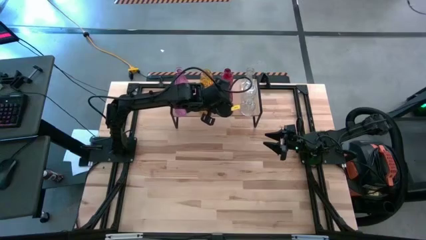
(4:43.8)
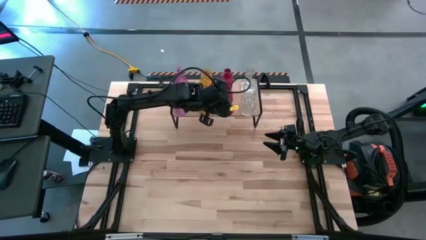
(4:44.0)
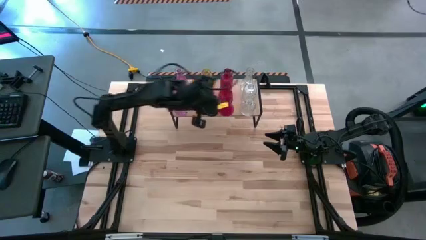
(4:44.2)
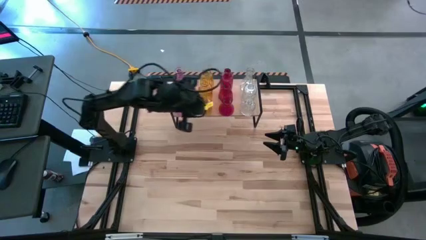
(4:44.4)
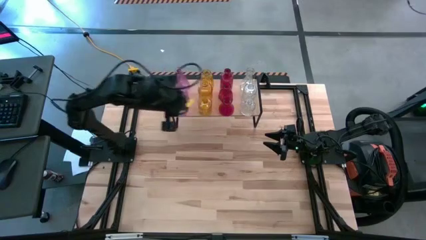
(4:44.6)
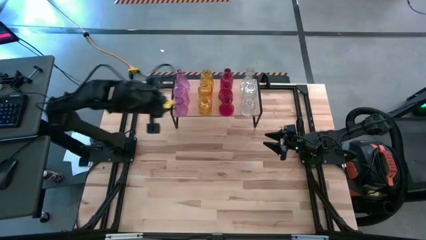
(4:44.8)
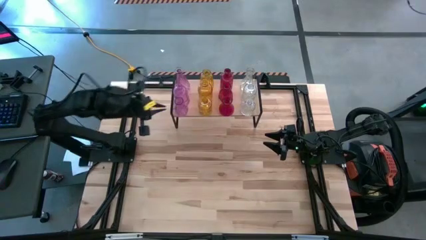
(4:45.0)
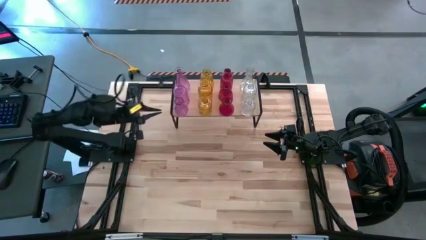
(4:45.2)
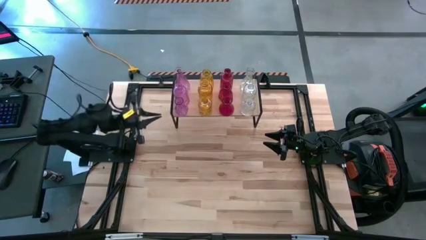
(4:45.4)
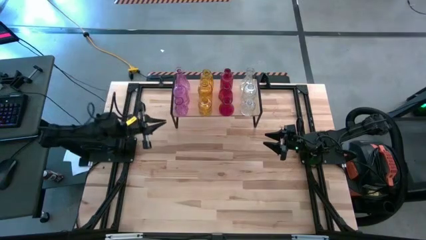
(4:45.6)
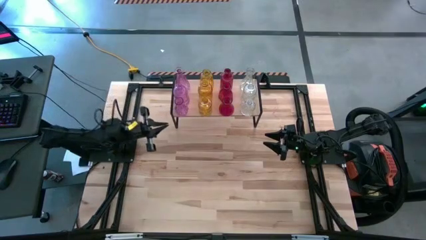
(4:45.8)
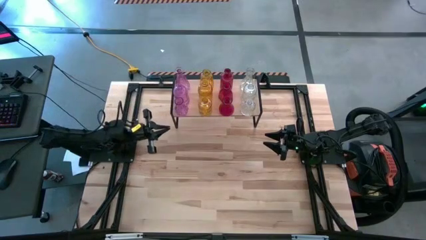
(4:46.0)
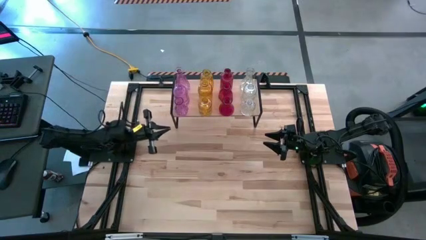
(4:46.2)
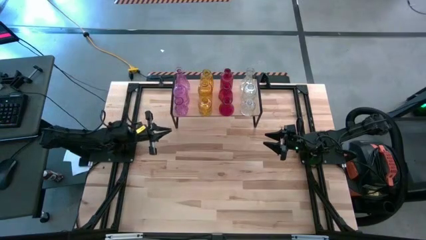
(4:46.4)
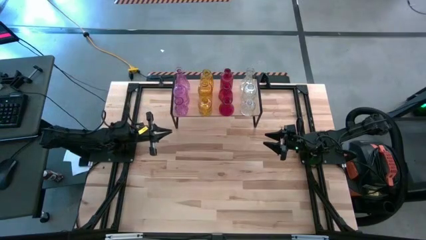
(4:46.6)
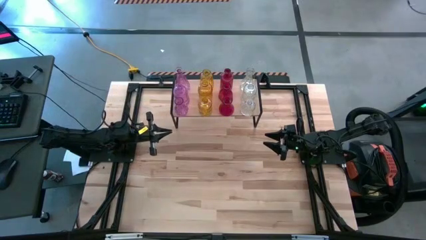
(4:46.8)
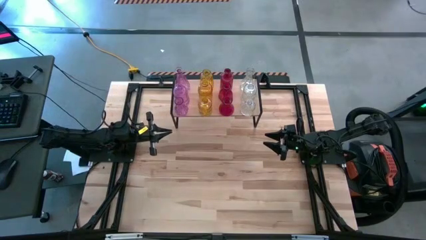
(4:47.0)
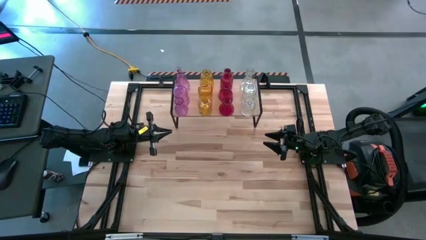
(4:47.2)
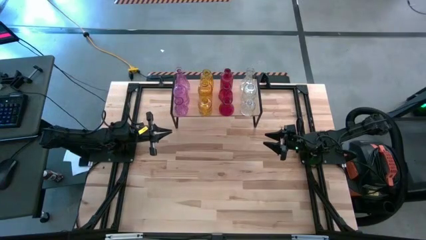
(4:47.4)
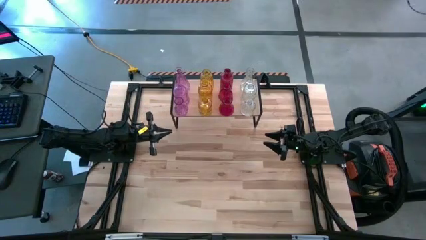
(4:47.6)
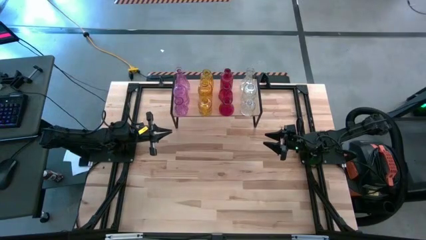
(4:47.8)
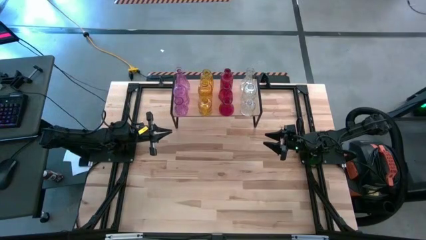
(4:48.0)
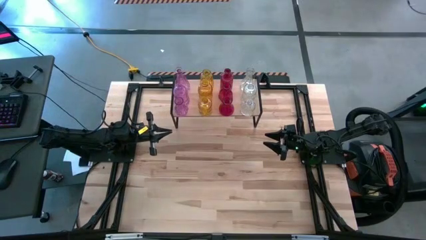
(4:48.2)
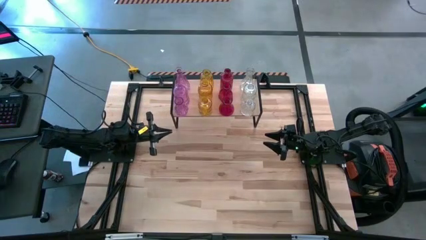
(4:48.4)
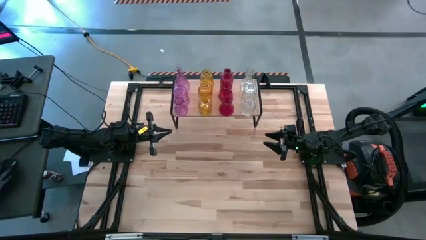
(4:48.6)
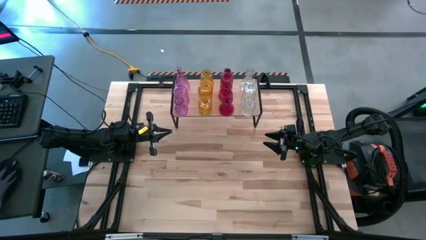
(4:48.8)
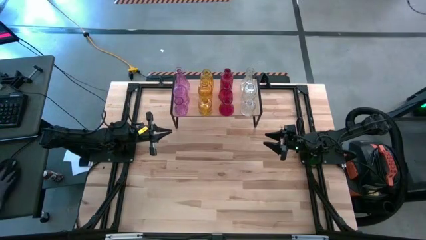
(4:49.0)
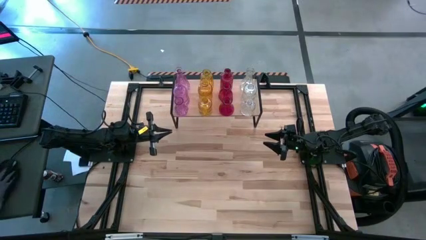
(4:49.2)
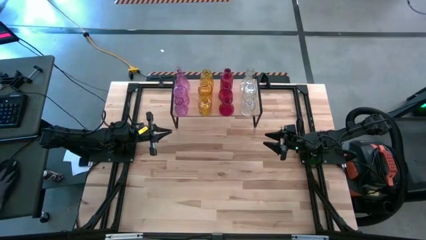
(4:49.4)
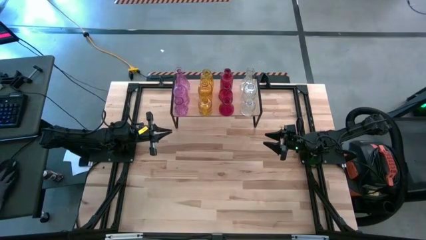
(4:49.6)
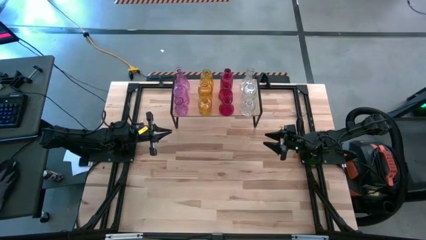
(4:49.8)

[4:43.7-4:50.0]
Task: sort vases onto shelf
Return to Home Position

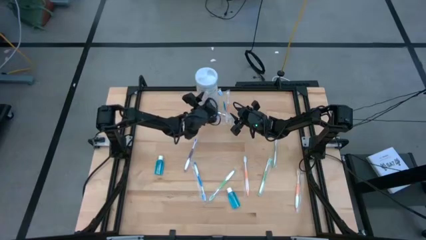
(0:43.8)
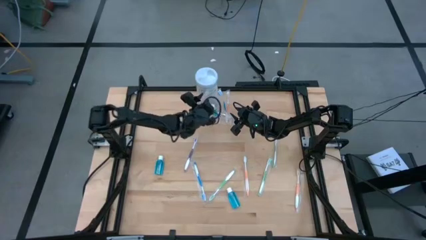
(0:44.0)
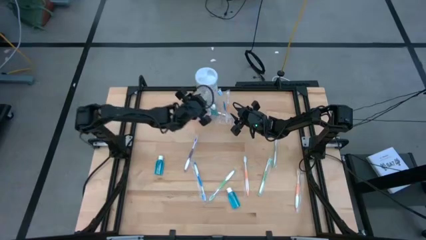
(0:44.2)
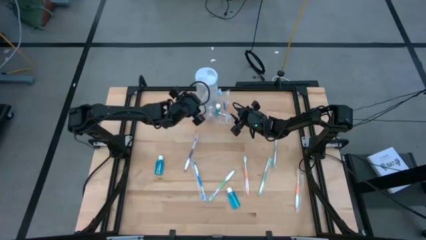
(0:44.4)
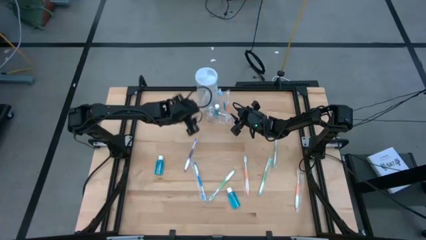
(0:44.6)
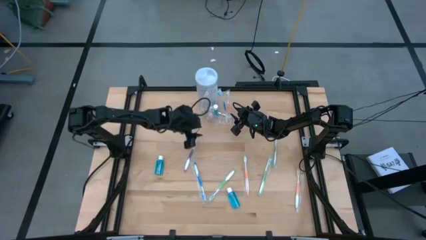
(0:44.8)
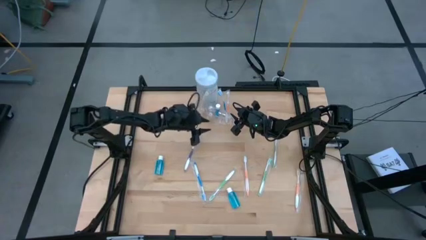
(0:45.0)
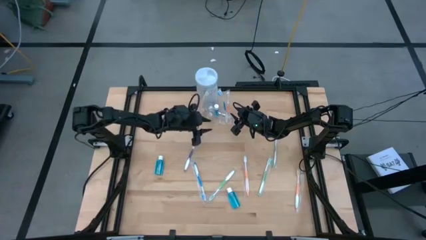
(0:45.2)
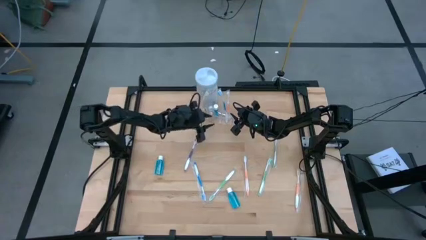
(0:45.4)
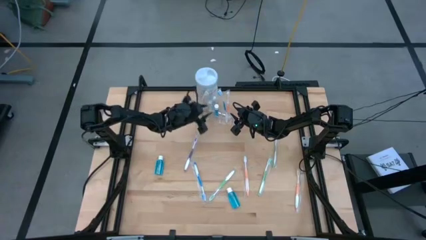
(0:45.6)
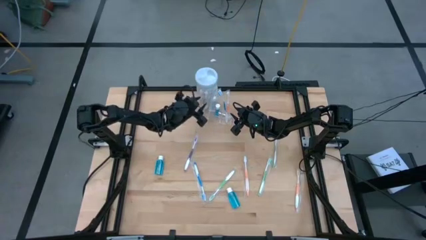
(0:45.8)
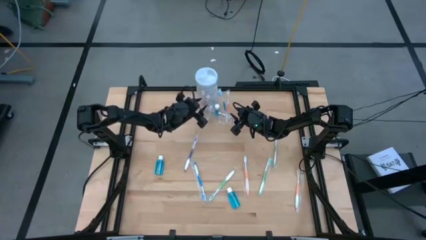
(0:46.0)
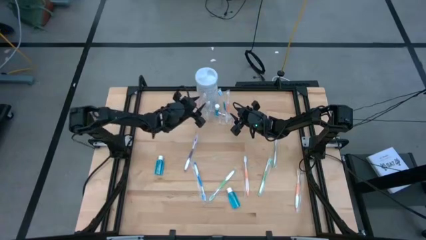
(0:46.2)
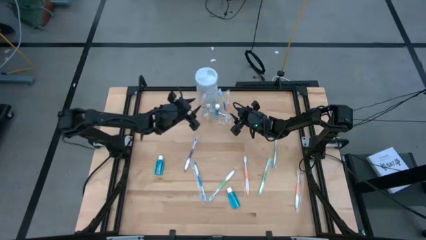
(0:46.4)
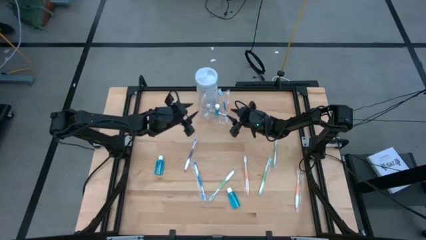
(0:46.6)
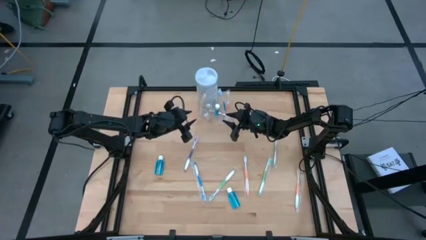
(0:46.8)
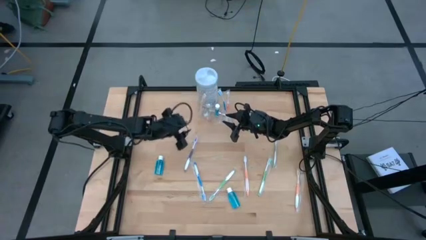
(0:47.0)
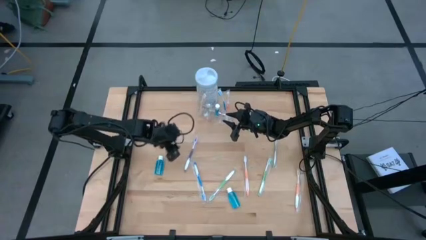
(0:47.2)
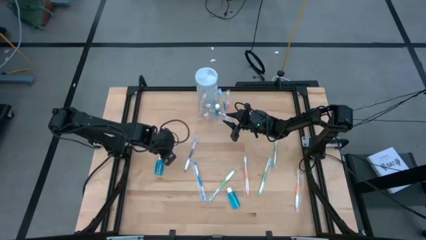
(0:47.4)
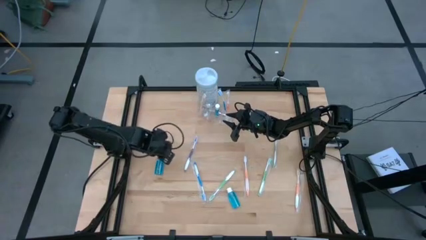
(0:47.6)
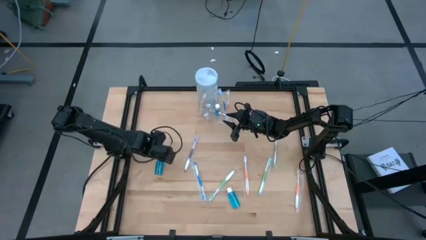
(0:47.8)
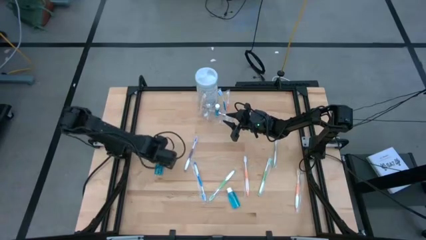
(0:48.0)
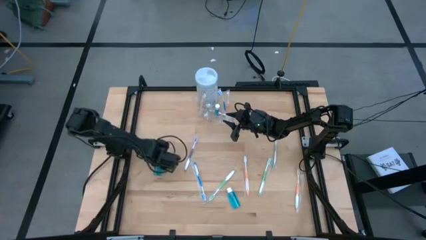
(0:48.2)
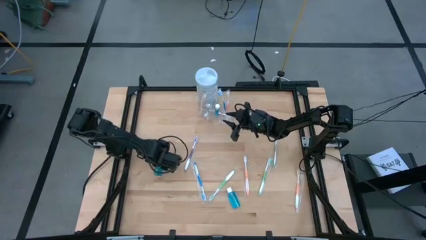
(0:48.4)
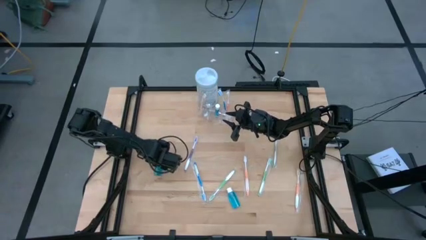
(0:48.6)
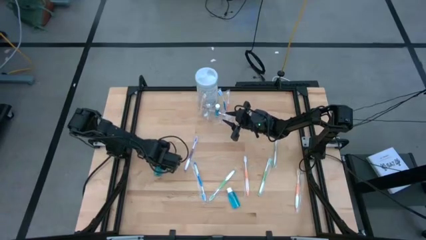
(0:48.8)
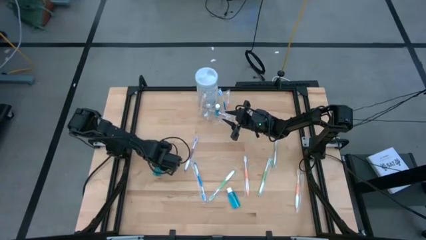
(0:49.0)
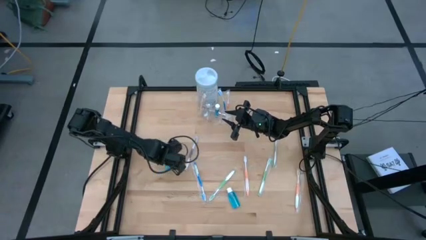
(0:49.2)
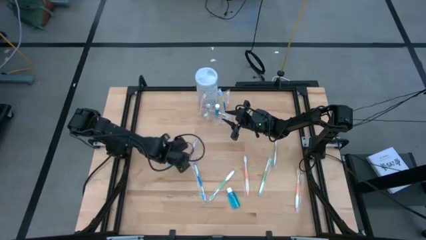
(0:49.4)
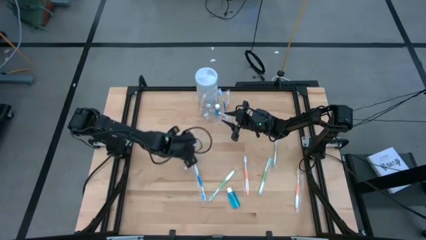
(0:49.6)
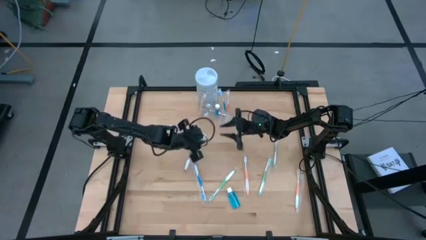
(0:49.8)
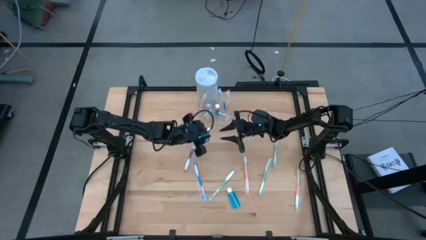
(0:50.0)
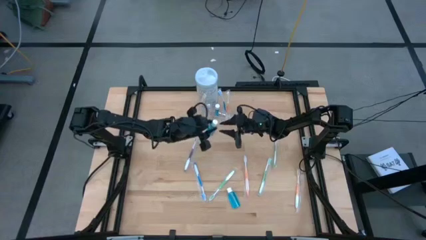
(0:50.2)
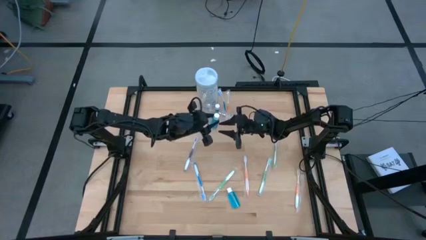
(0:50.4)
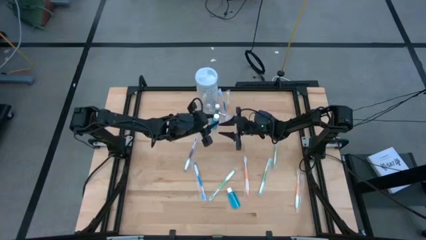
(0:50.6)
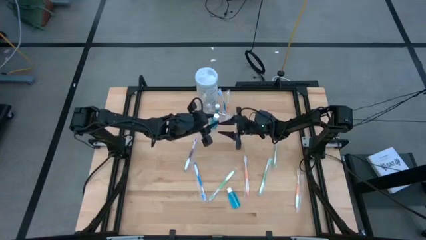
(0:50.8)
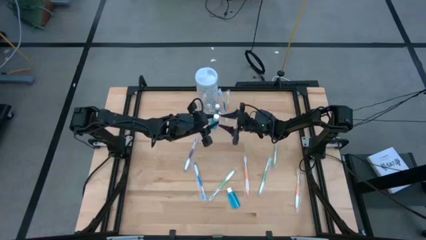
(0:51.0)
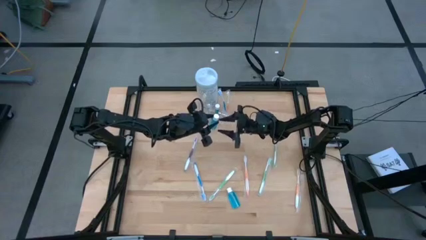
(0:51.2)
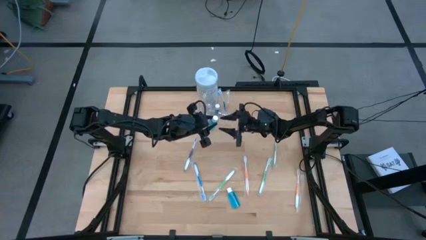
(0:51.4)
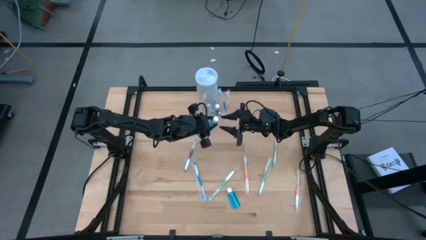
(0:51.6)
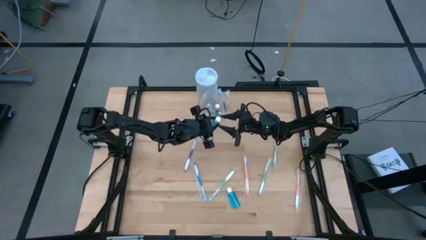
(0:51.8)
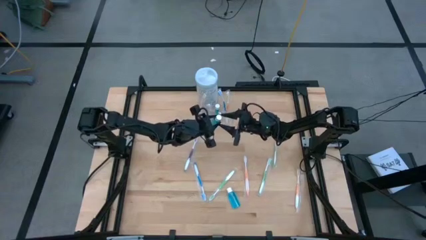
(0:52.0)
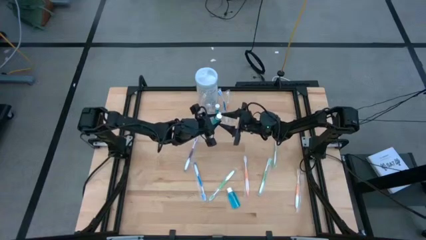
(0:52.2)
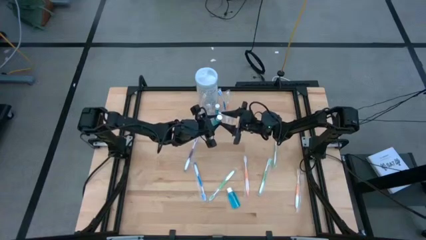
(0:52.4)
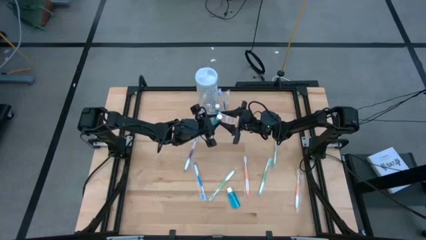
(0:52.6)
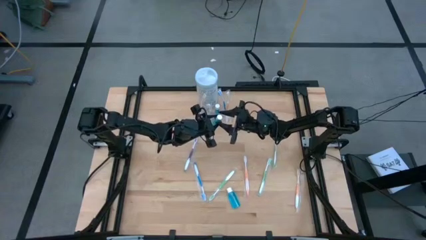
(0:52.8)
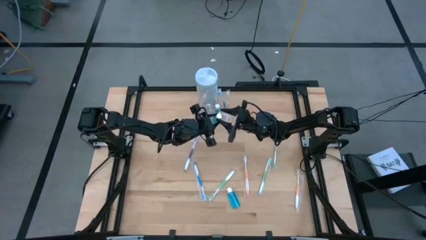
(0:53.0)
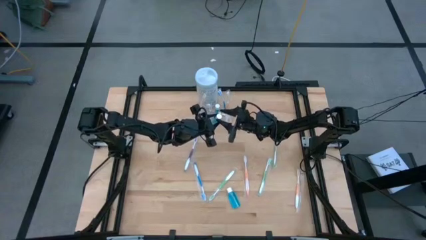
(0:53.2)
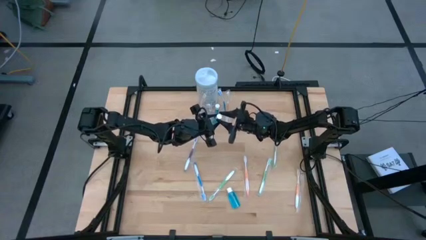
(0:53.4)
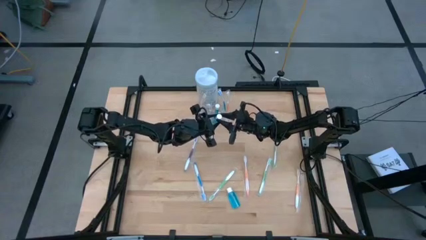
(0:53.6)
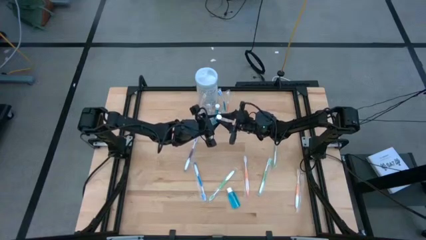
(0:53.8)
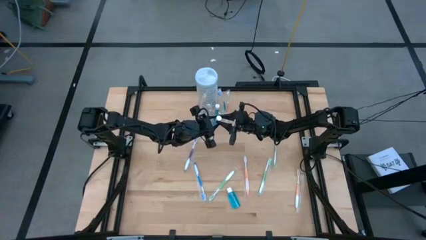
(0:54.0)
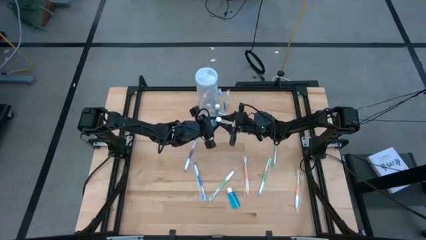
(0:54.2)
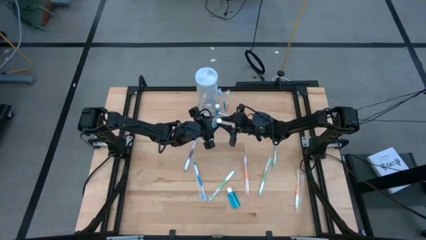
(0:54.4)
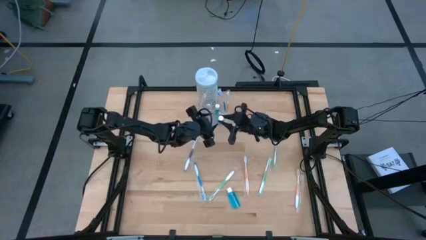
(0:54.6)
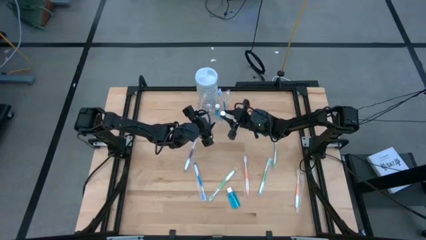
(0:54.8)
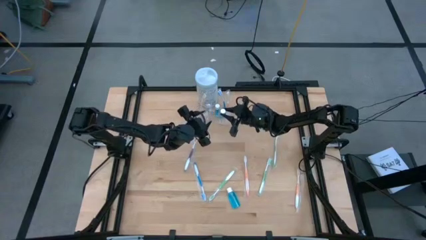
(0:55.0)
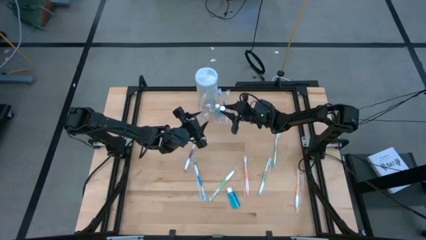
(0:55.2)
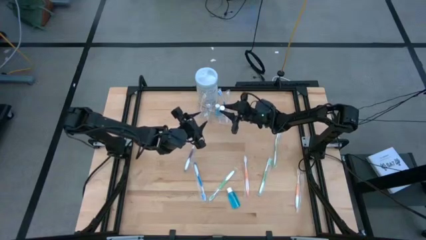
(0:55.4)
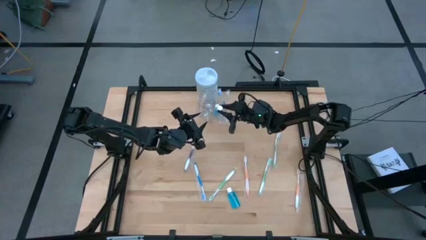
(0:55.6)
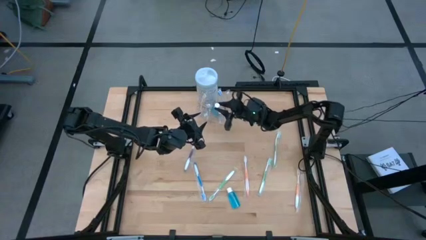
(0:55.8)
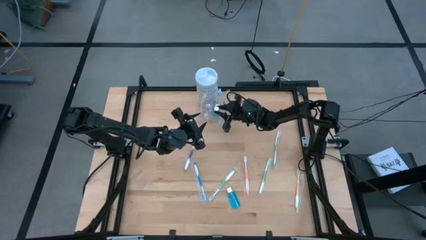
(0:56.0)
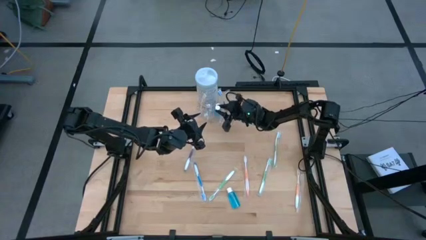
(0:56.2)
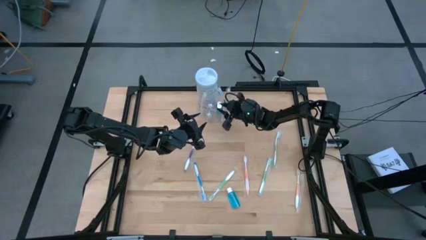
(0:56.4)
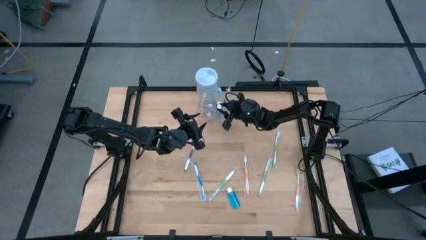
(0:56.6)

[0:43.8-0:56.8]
Task: Pick & Place toothbrushing station
Put the blue mouthwash bottle into the transparent organizer
